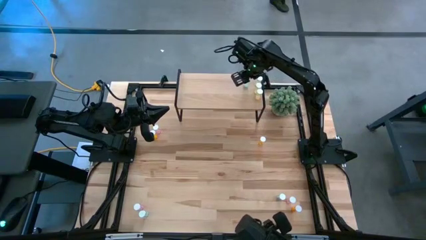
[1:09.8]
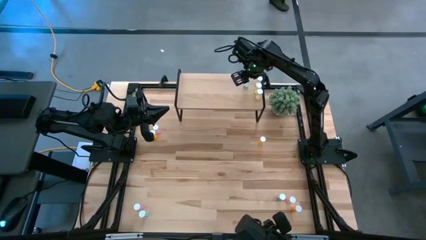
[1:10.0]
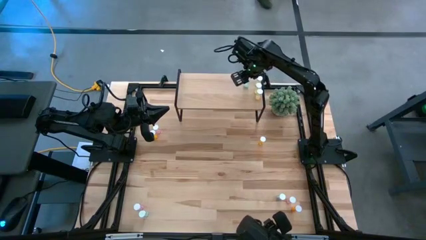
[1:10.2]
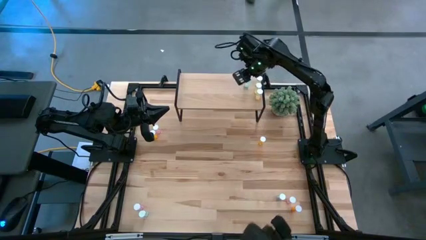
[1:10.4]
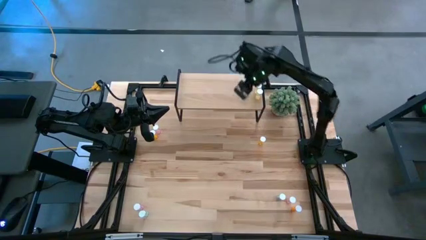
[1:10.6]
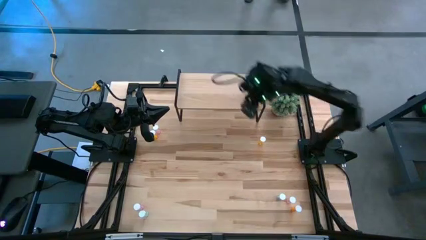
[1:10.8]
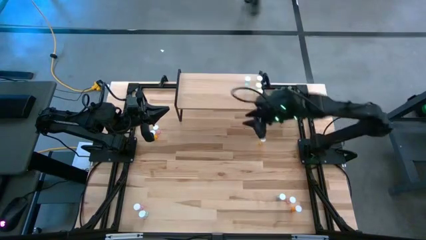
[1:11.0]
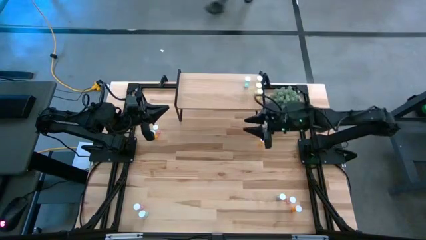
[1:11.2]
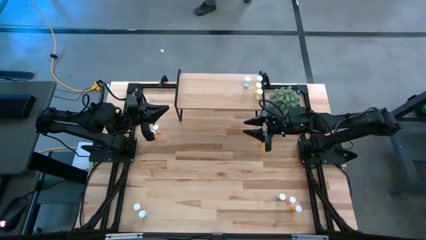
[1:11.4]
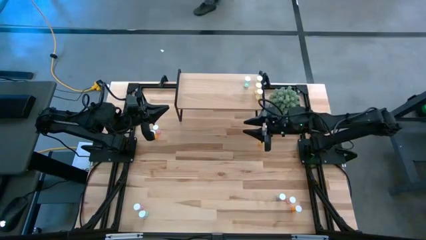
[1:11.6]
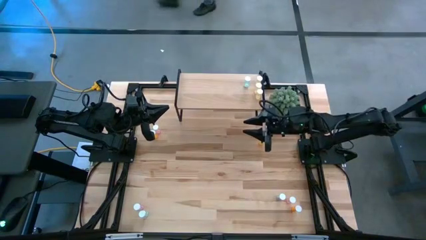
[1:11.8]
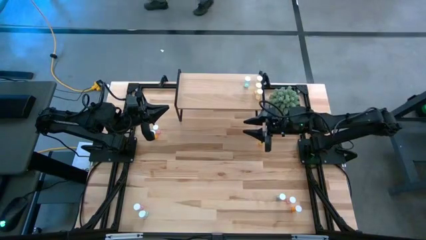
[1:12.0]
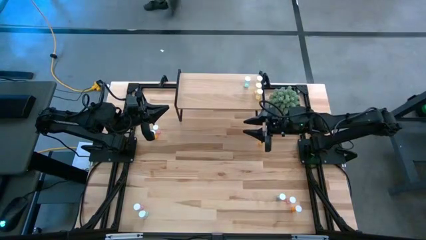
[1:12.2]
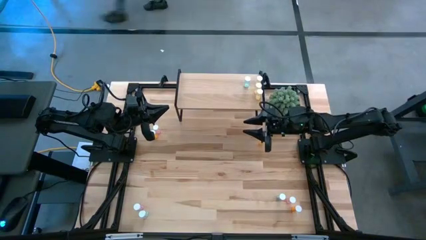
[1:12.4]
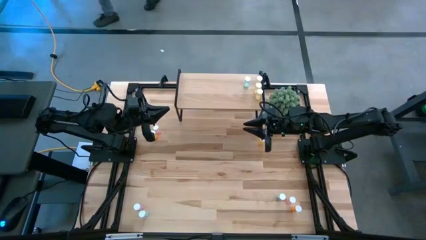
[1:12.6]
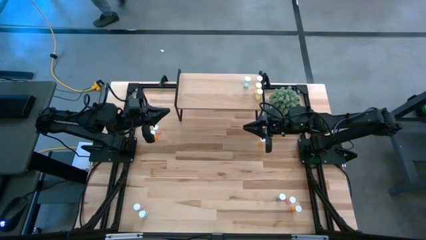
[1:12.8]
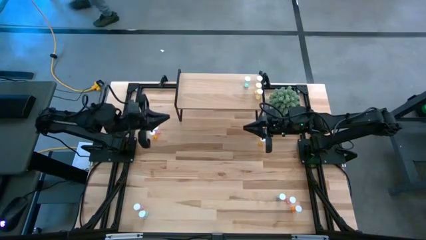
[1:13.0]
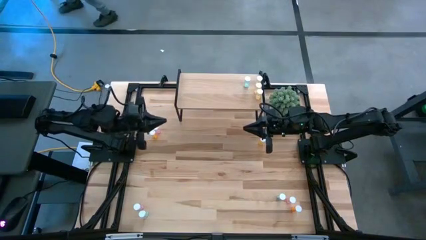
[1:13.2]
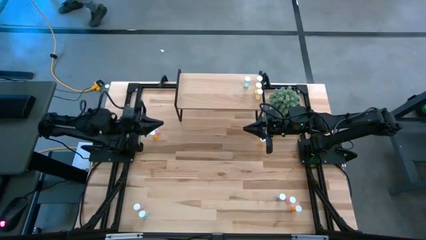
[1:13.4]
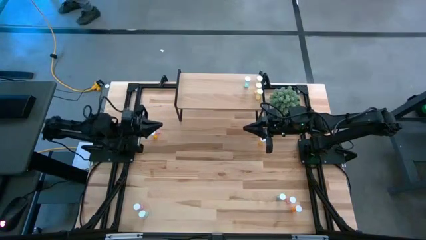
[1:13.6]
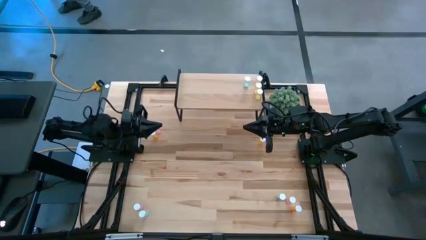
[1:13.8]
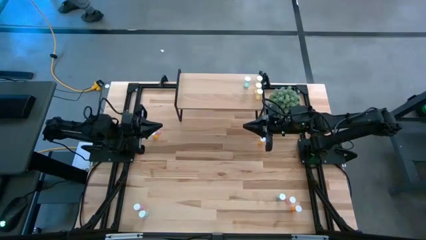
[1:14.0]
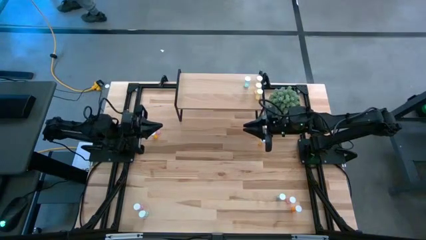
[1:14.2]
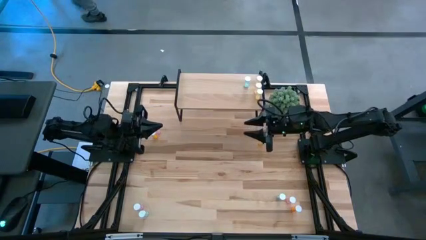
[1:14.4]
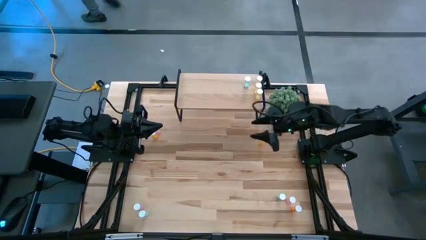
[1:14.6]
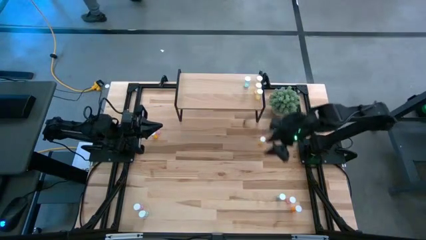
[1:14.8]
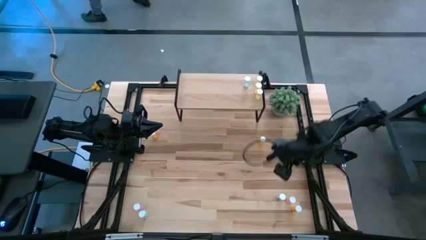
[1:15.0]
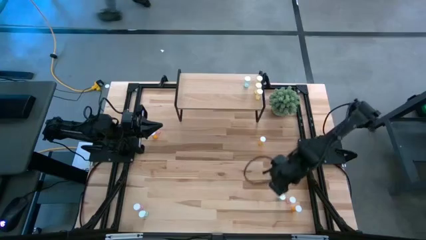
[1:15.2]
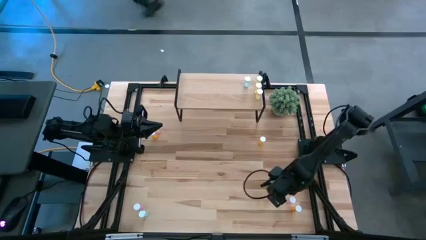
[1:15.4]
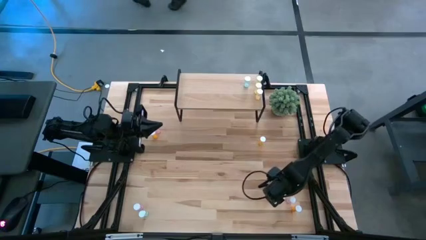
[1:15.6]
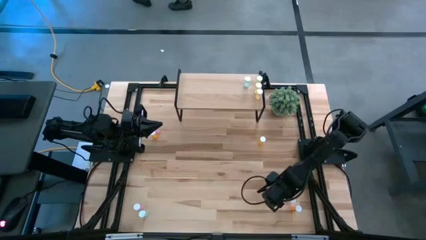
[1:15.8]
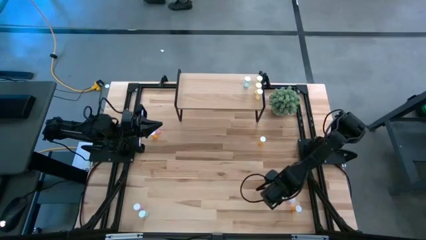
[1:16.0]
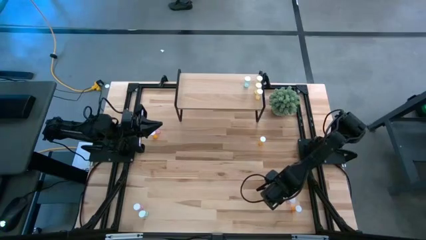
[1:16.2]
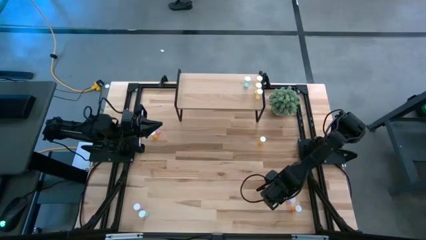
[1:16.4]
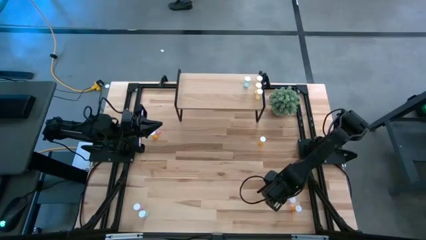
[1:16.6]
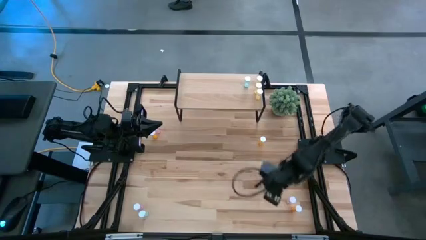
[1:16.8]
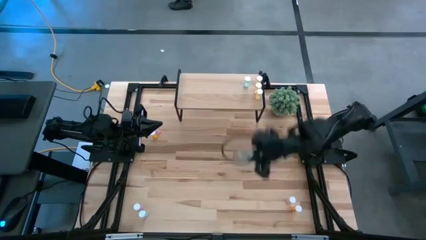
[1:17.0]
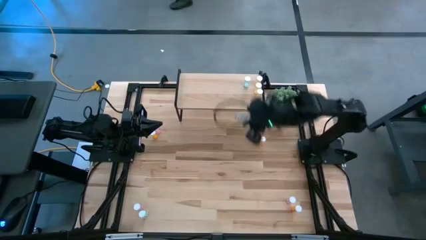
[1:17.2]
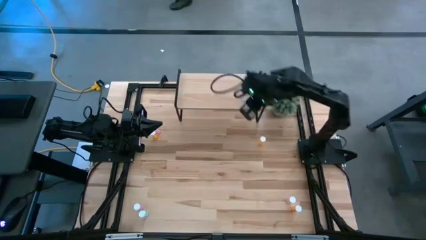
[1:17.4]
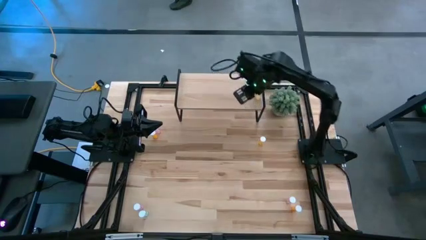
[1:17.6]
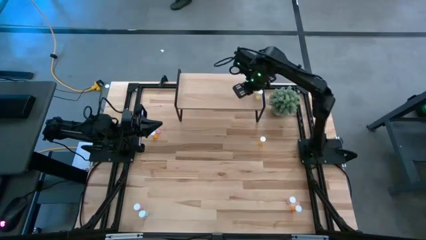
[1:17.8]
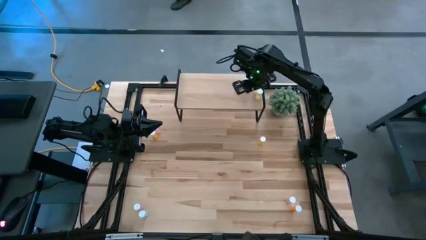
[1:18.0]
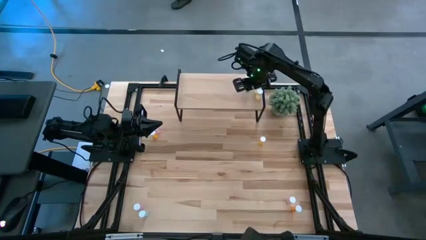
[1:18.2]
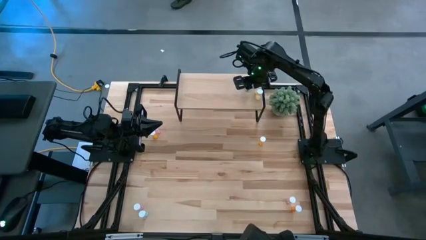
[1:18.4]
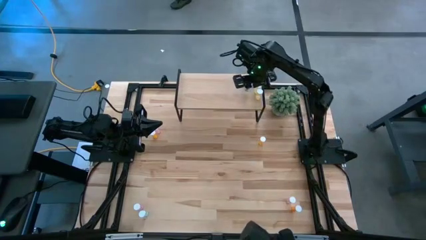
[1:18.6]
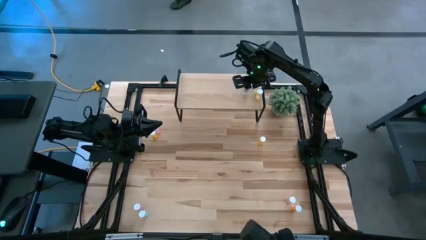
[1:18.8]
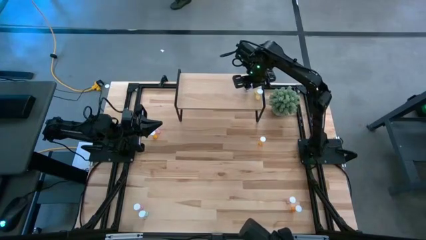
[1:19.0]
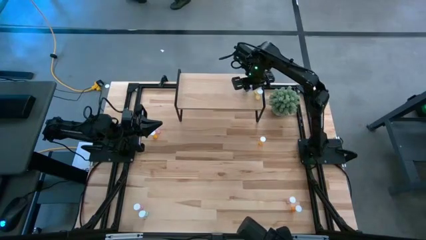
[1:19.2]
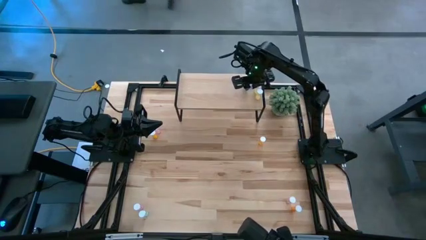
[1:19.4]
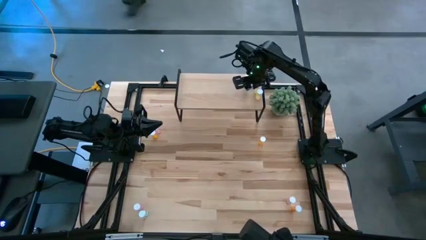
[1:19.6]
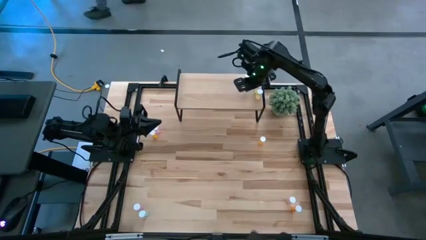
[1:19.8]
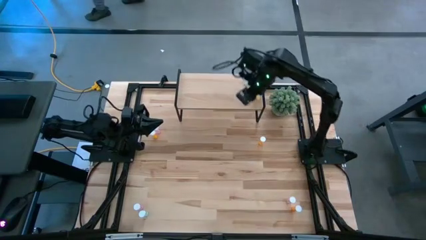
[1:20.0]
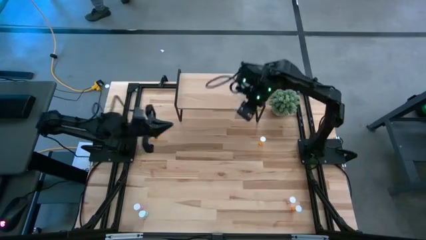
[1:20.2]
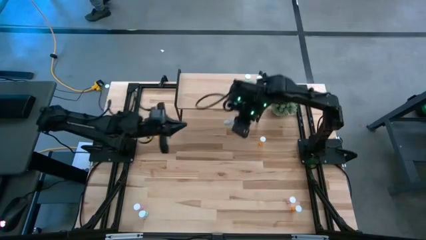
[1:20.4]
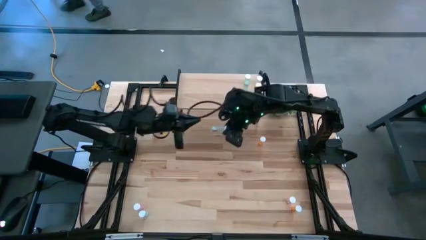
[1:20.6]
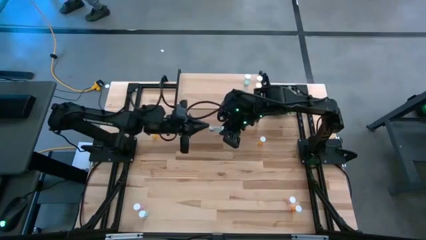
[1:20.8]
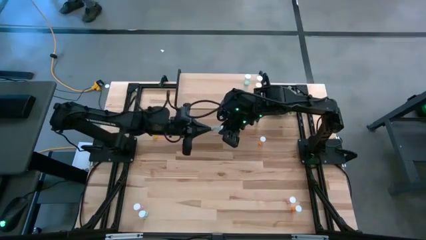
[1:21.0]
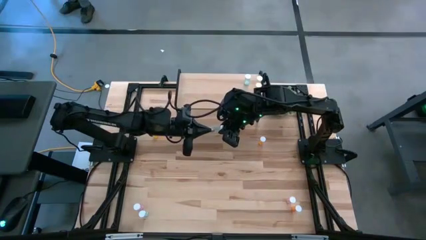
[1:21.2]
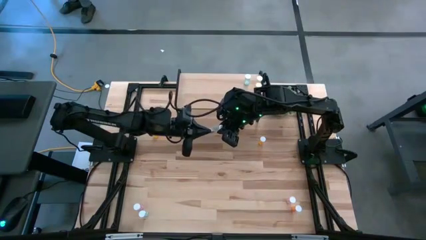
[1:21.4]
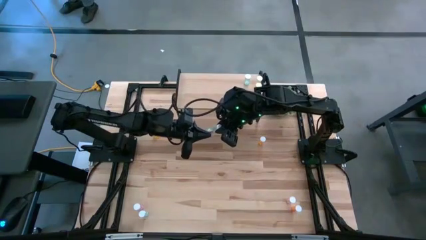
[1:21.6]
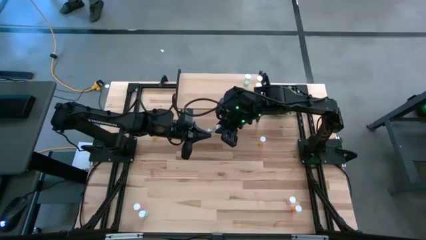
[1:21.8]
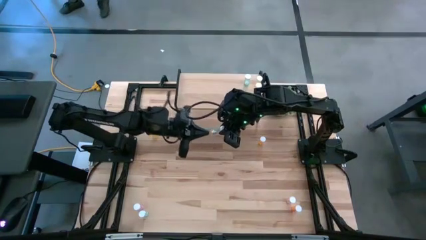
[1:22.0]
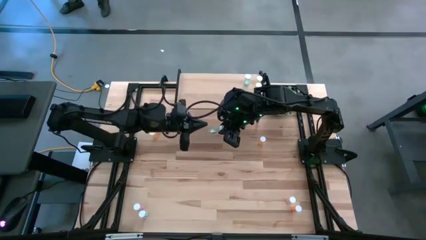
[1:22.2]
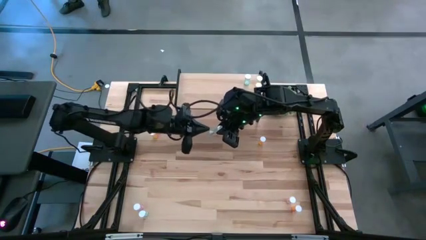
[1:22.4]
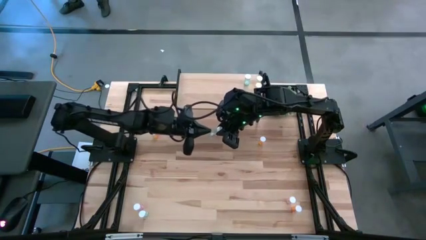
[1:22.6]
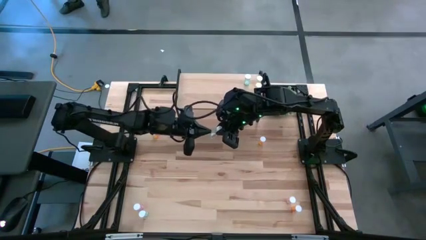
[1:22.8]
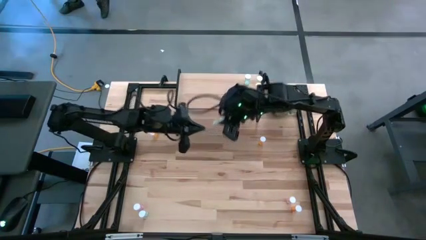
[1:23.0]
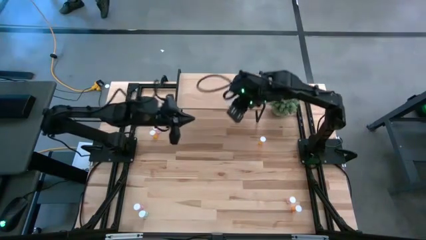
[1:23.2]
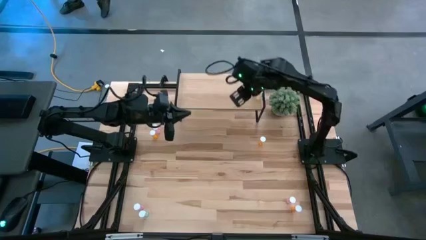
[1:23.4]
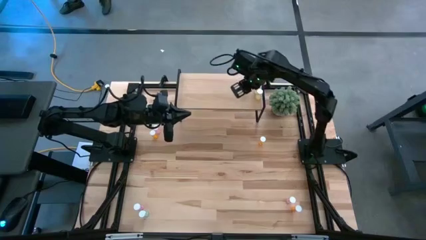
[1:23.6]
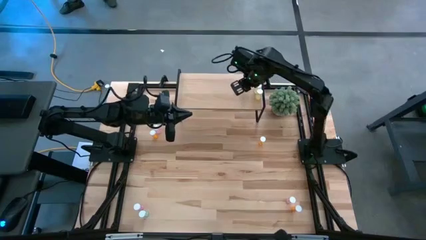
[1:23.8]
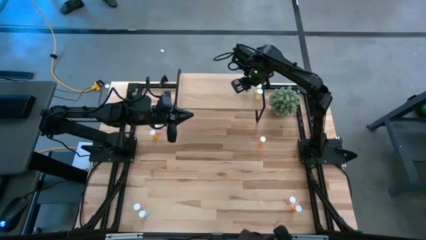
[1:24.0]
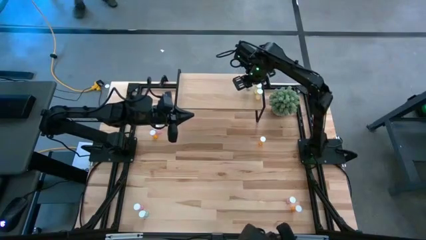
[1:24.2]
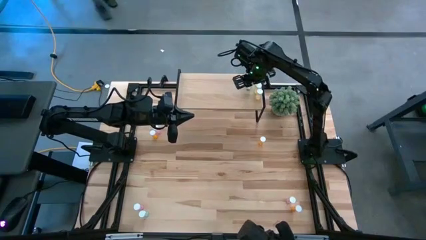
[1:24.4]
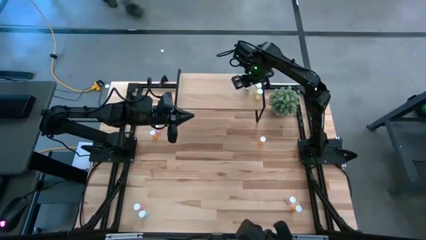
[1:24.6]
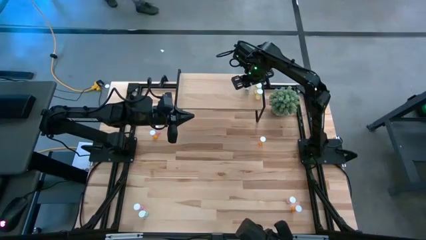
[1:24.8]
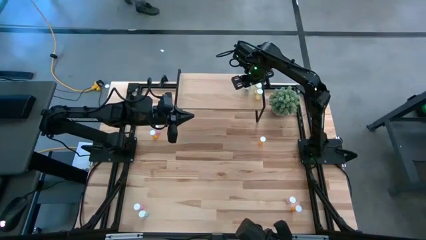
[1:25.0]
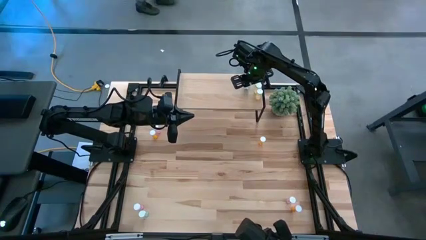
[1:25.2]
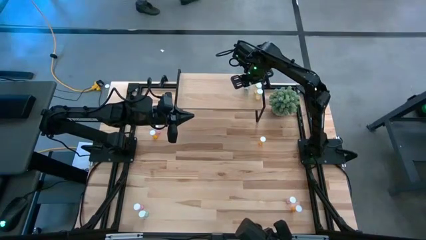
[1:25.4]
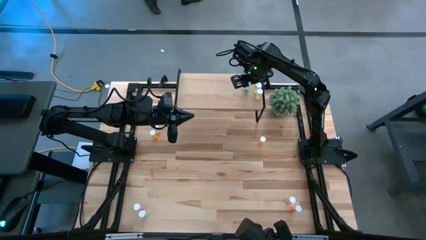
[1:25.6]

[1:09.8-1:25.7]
Task: Pick and place medicine bottles onto shelf by color
Put the right blue pill bottle on the shelf aligned with the other blue pill bottle
